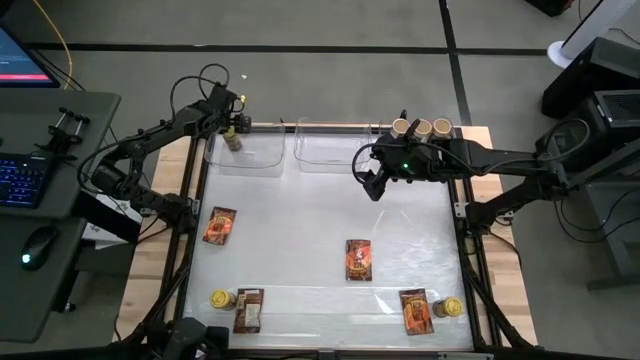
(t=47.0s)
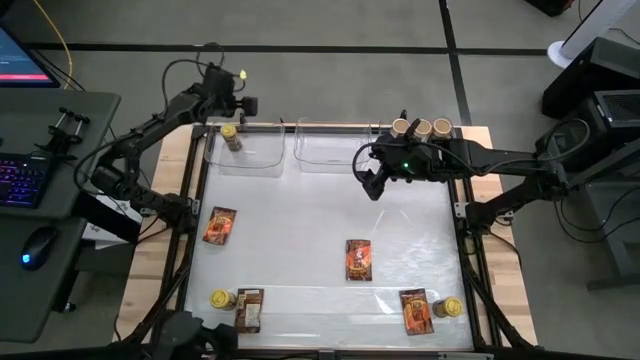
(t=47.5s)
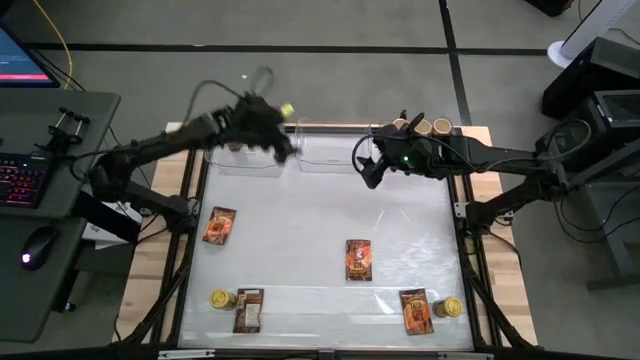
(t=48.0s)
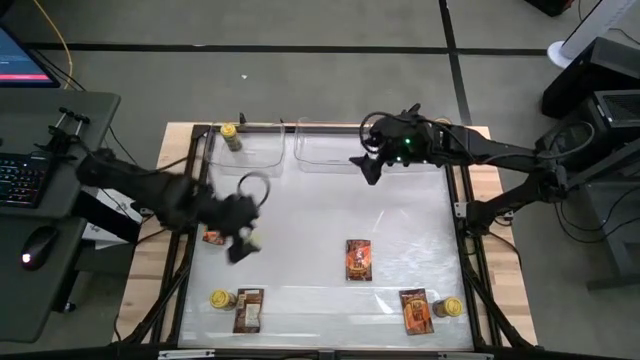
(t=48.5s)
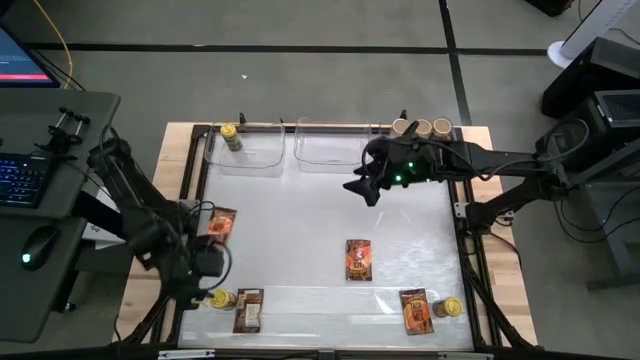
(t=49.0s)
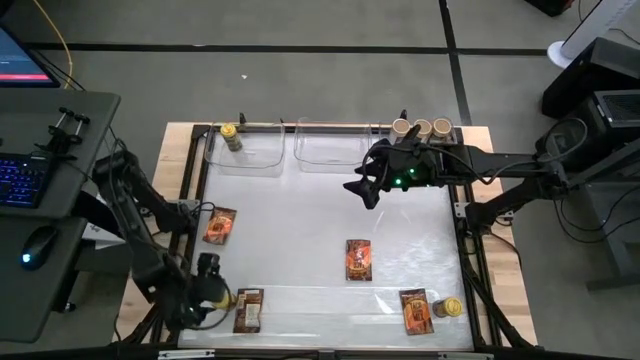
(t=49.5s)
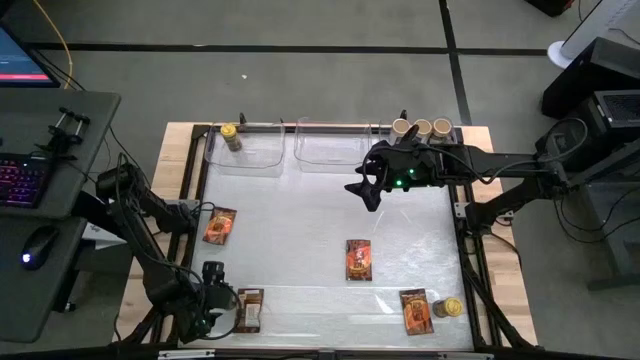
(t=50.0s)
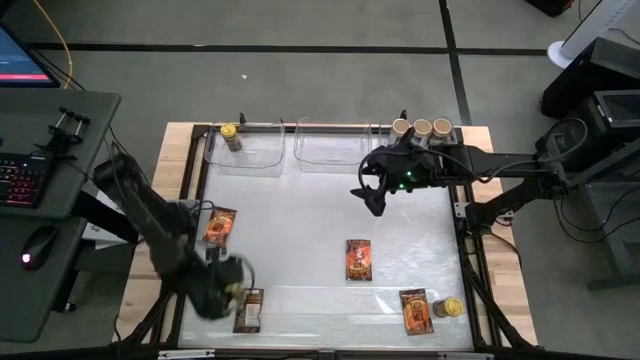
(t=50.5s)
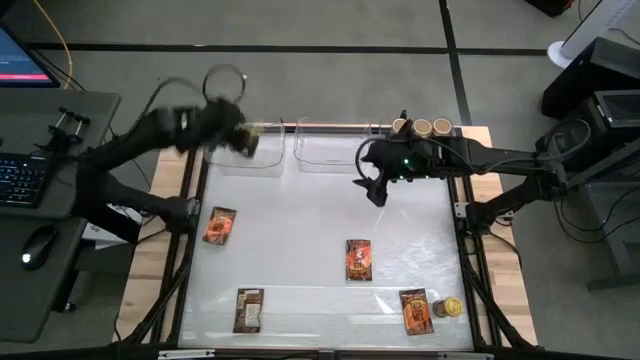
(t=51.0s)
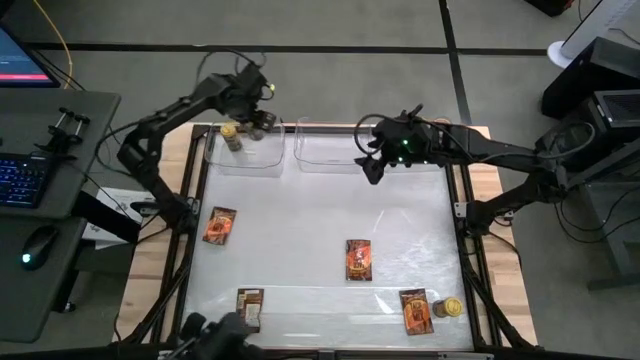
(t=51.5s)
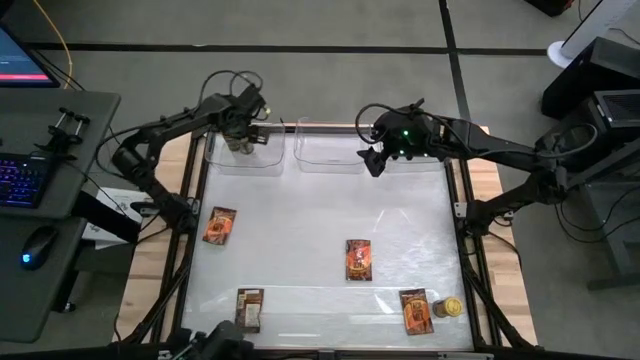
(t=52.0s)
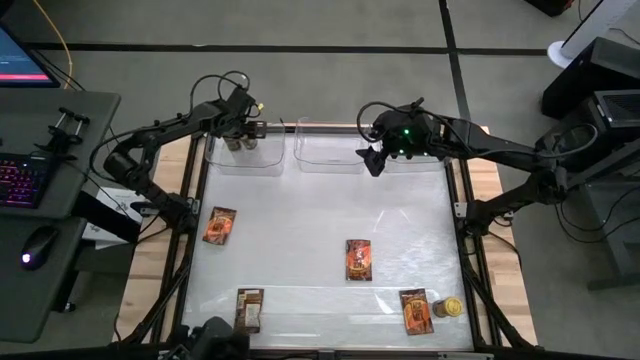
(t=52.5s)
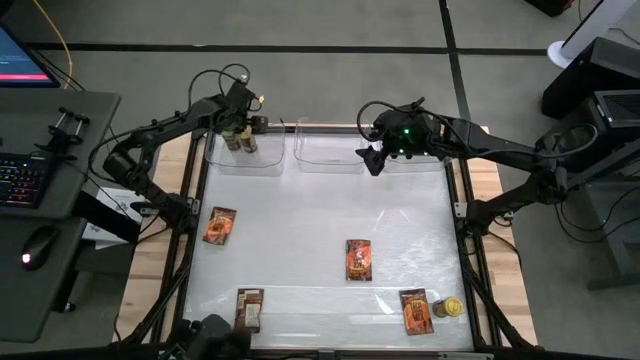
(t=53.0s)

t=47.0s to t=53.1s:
Task: Sort spices by type
Put the left yellow seasoning into the left transparent bin

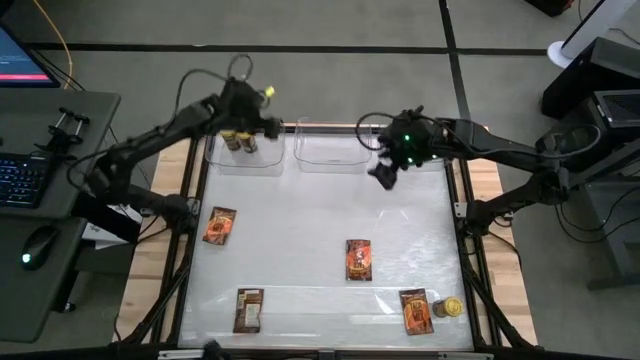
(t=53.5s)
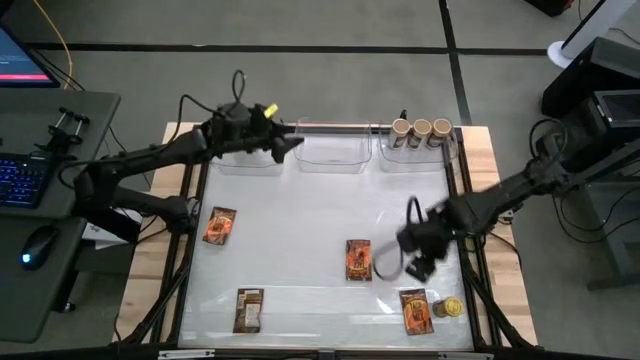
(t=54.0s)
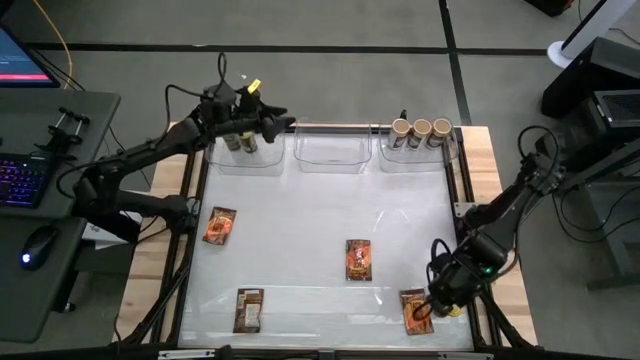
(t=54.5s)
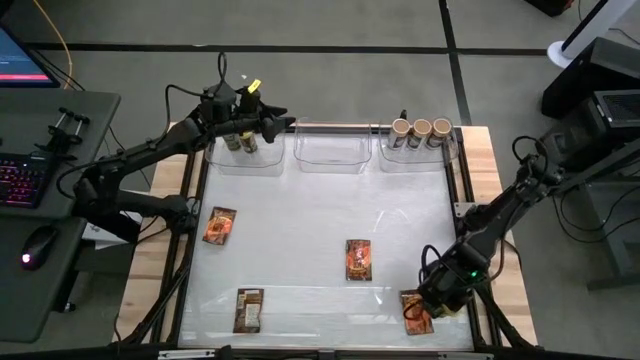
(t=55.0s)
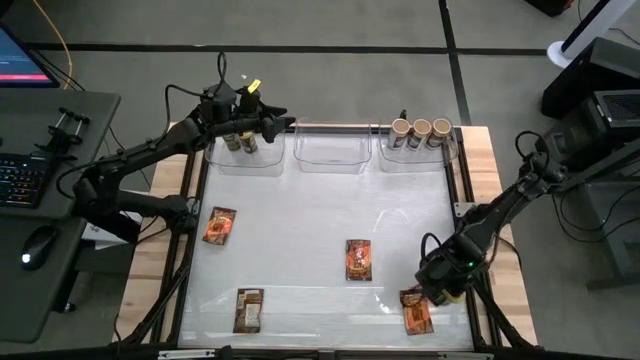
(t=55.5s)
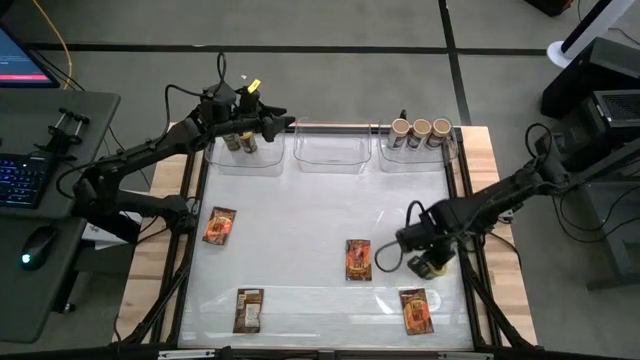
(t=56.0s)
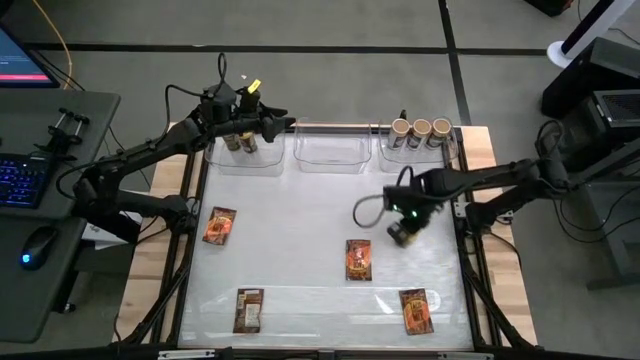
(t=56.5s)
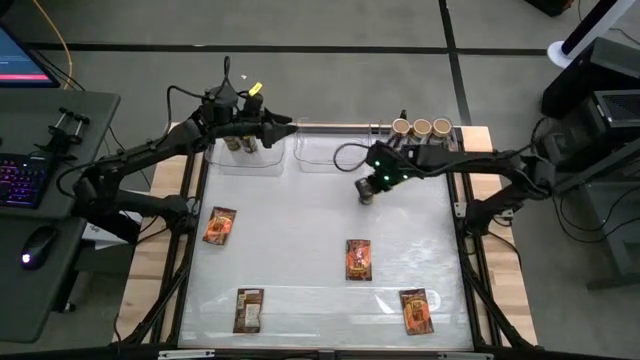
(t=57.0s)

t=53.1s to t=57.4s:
Put the yellow seasoning bottle into the left transparent bin

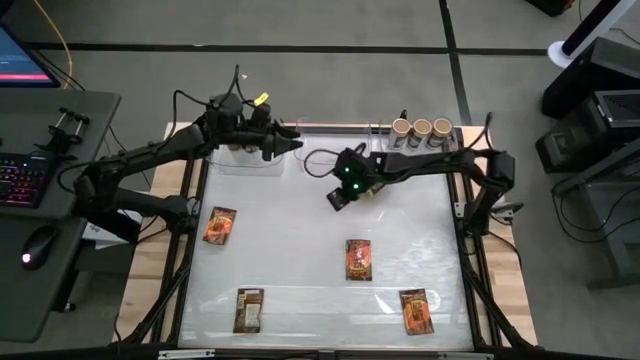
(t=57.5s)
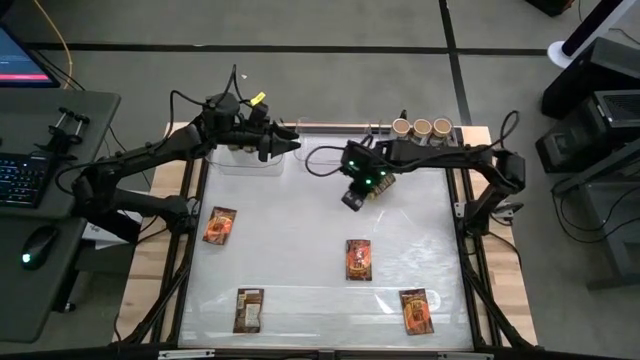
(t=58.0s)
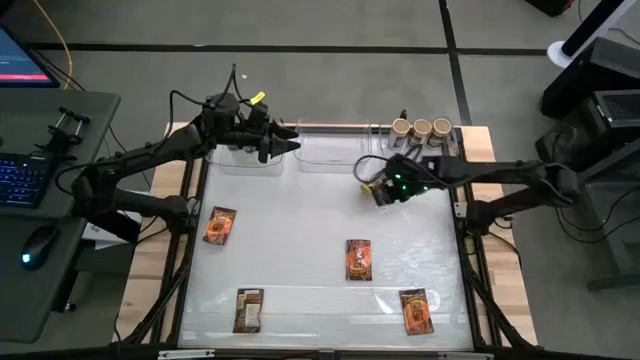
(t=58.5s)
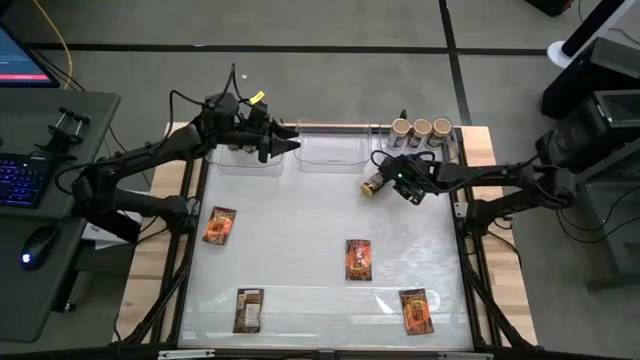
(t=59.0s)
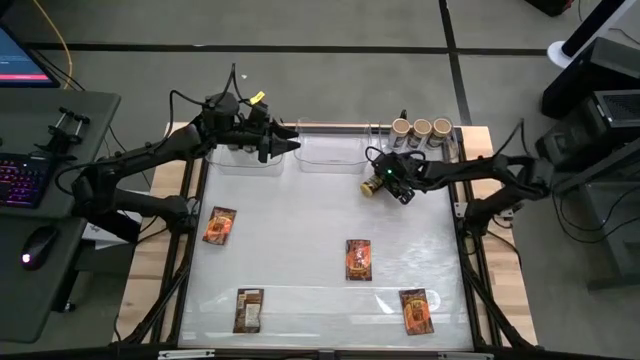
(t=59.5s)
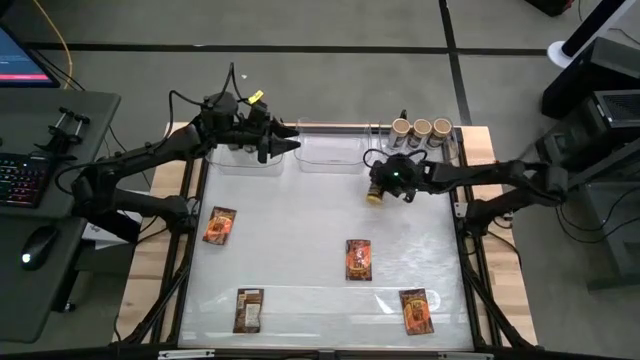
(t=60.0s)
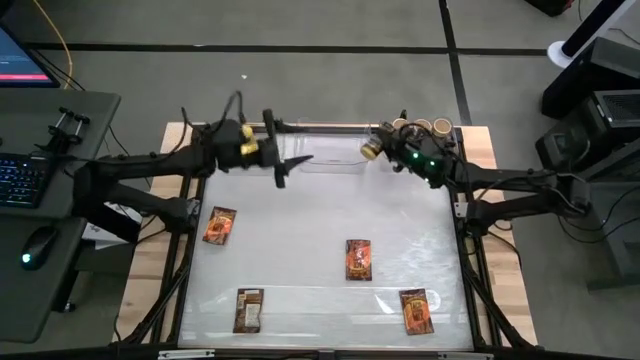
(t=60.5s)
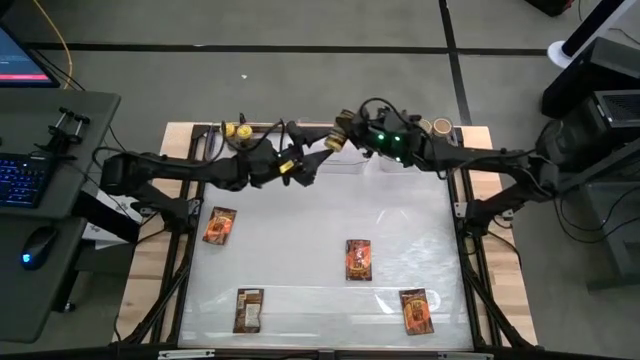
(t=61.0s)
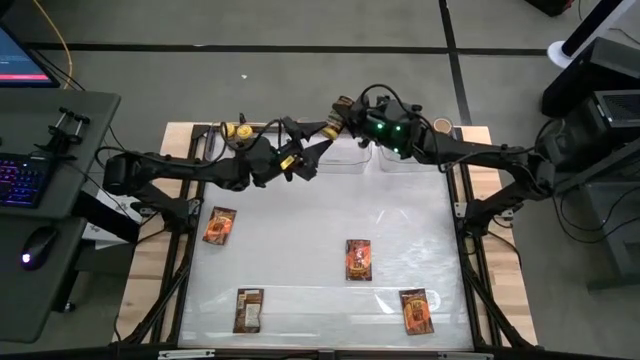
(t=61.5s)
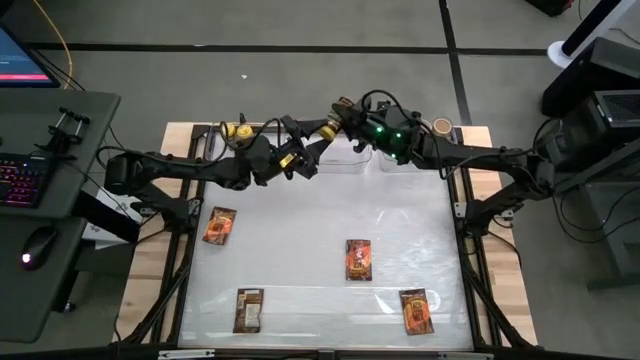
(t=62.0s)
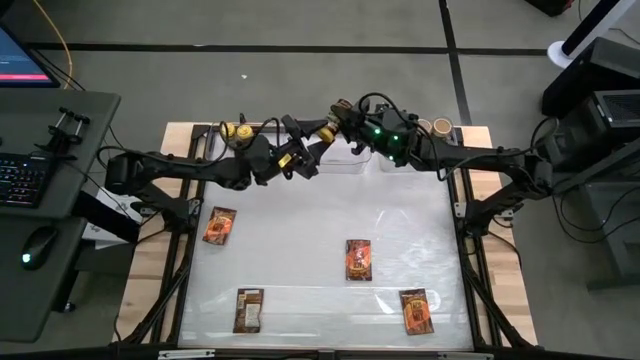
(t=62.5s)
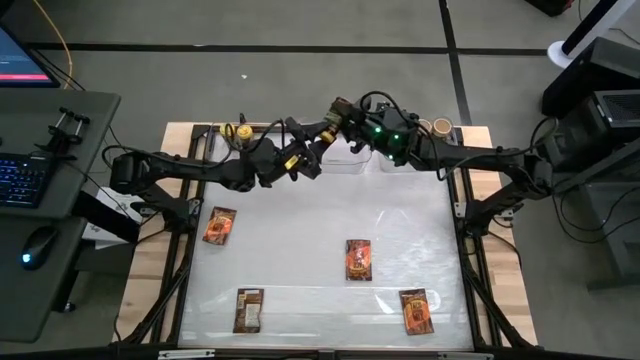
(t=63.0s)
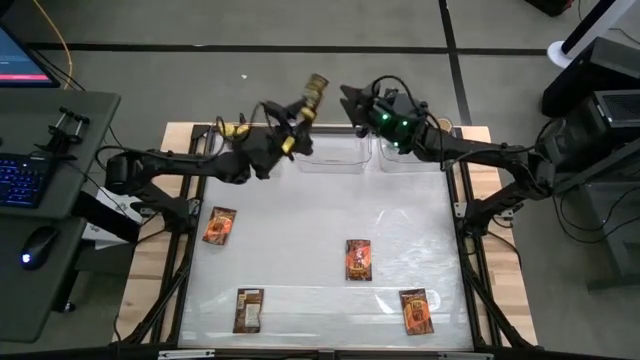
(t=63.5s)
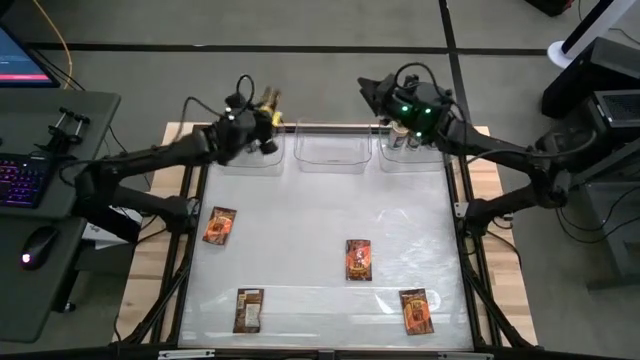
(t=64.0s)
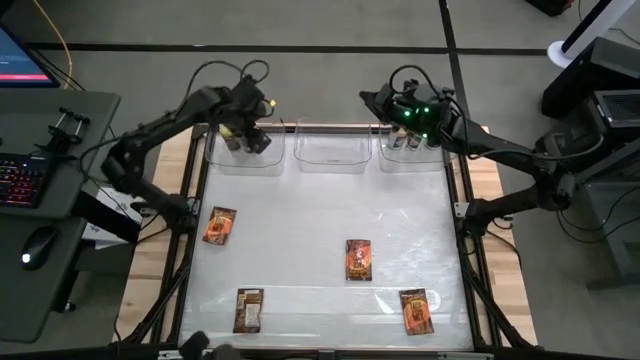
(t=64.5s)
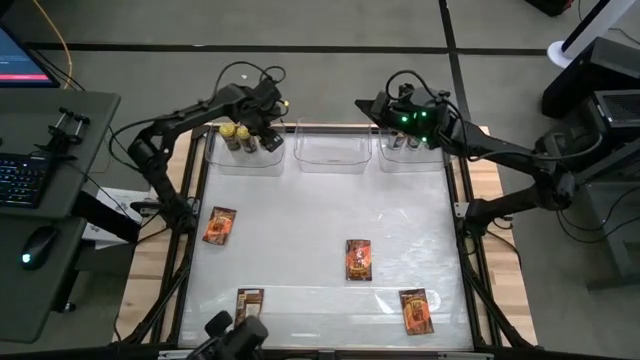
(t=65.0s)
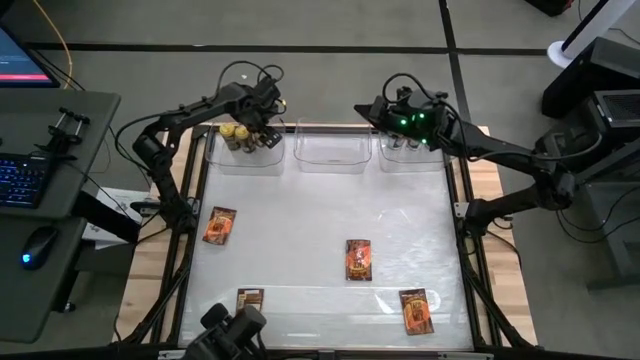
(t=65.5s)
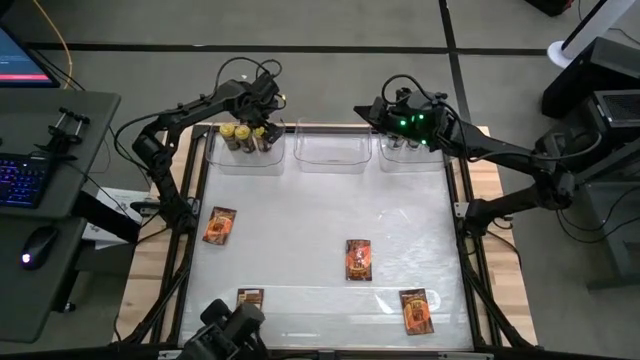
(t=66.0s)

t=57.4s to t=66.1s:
Put the yellow seasoning bottle into the left transparent bin

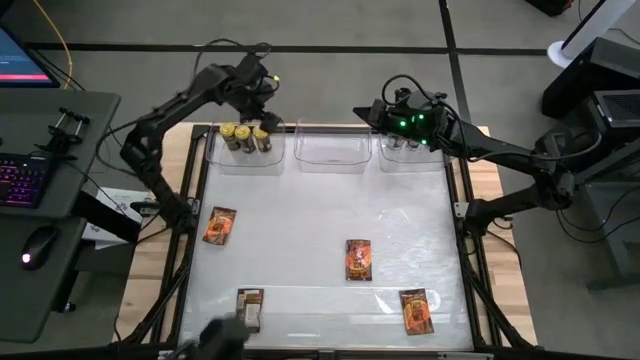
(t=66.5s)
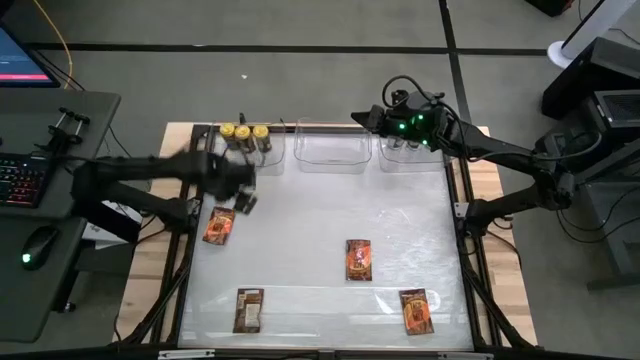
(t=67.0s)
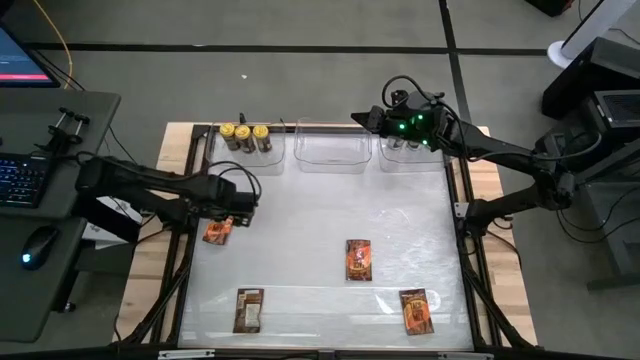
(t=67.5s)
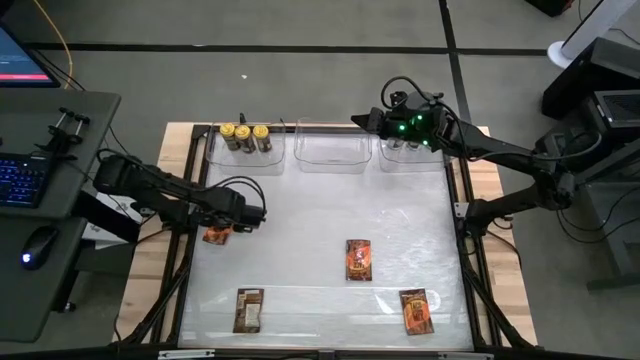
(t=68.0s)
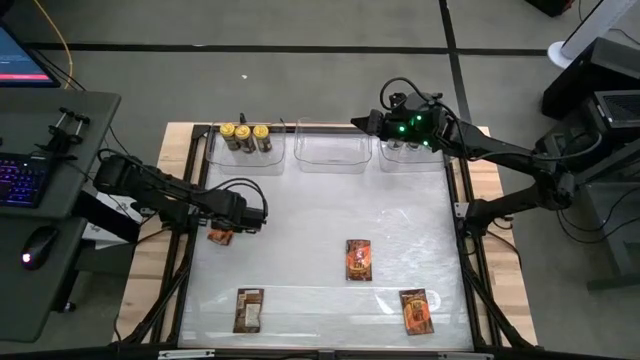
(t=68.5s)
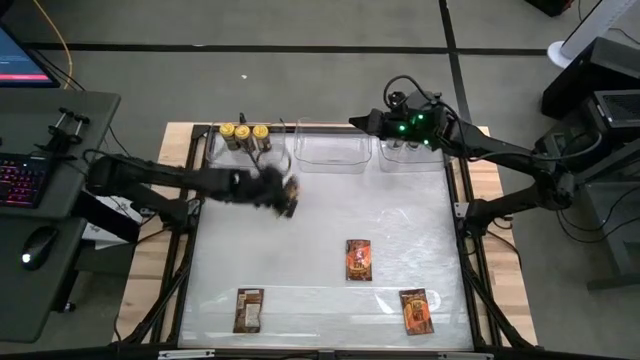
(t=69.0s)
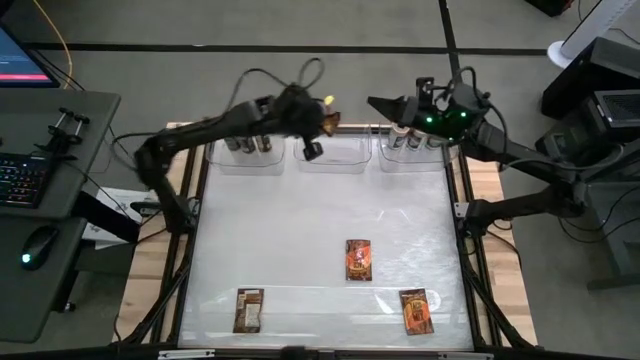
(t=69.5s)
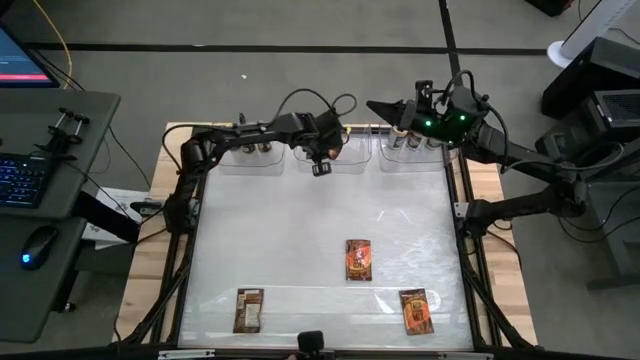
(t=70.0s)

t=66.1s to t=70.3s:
Put the top left orange seasoning pack into the middle transparent bin
